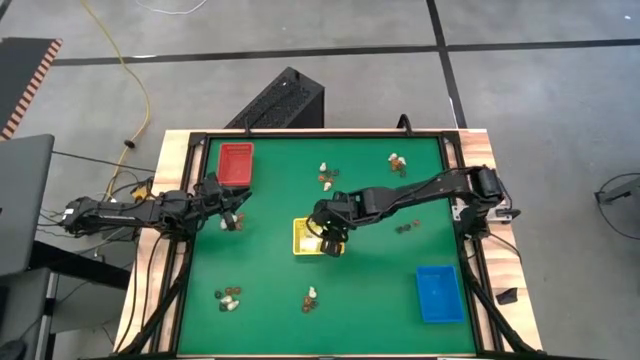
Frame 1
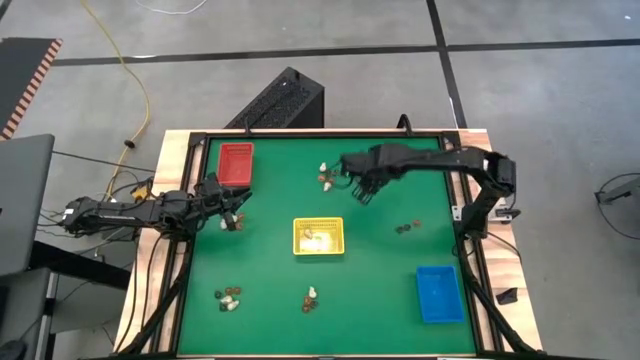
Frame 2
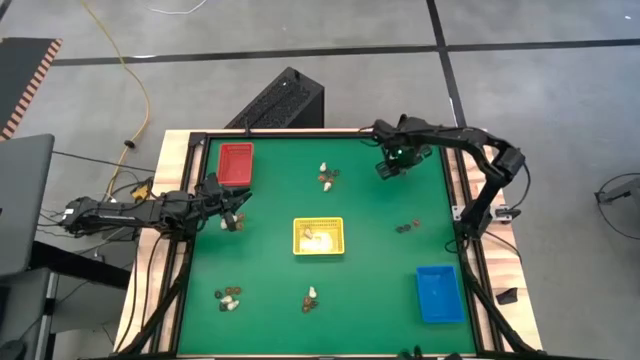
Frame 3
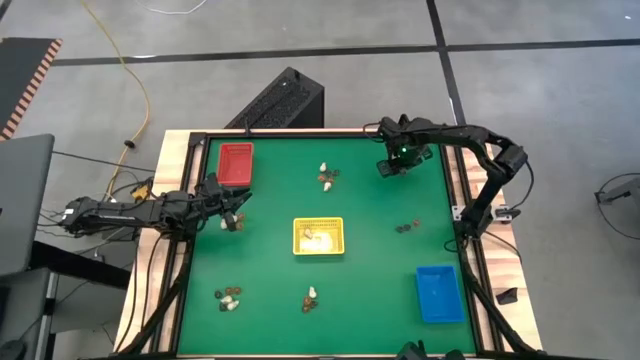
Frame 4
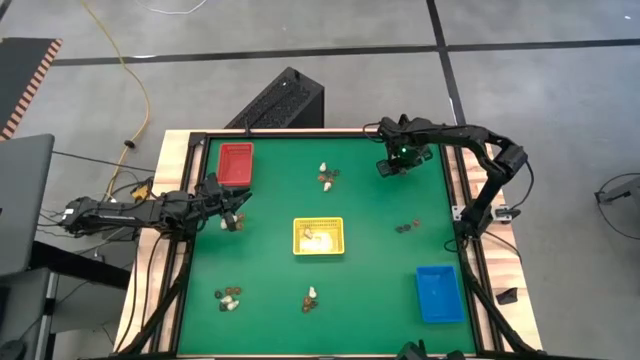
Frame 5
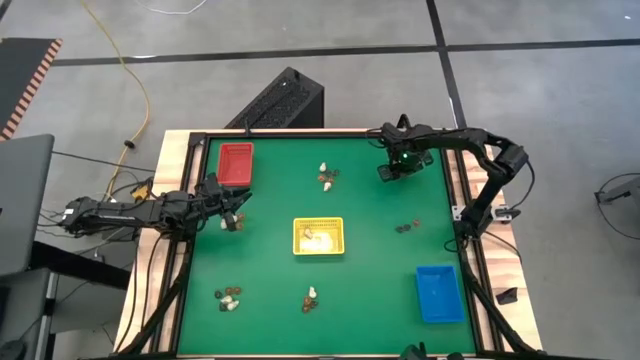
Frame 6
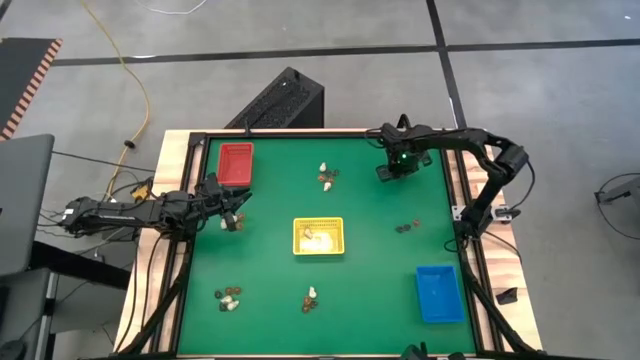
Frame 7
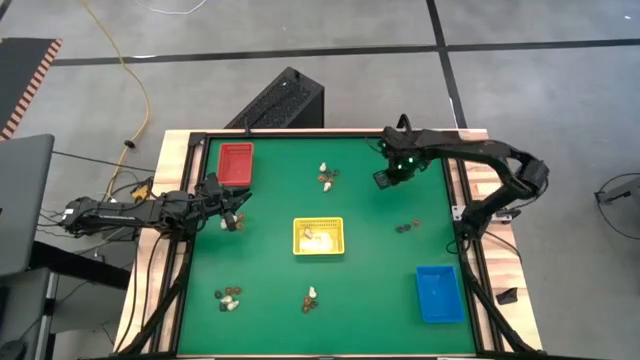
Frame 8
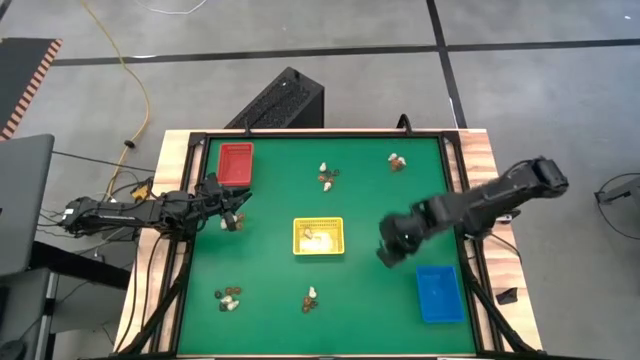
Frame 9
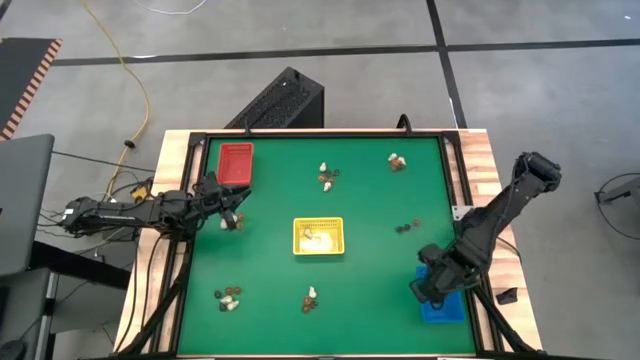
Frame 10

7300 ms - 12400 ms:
Task: Sort Halloween decoration
Put the black skull toy into the blue bin

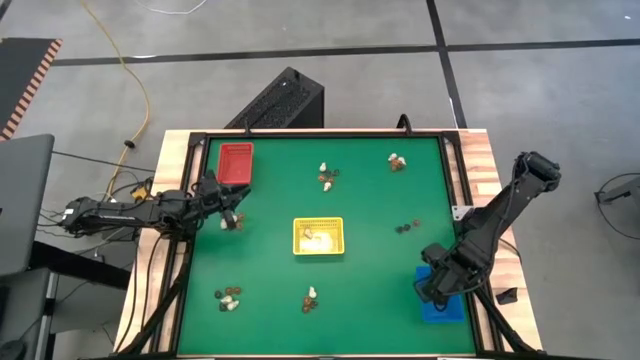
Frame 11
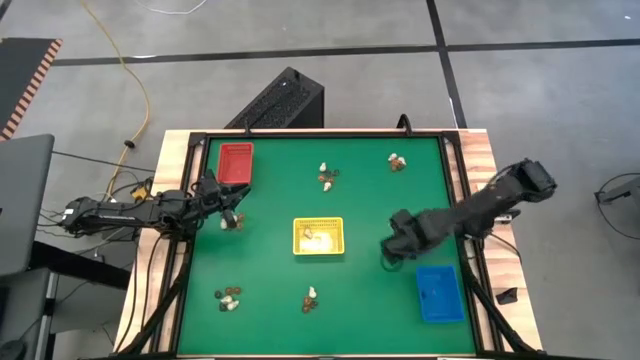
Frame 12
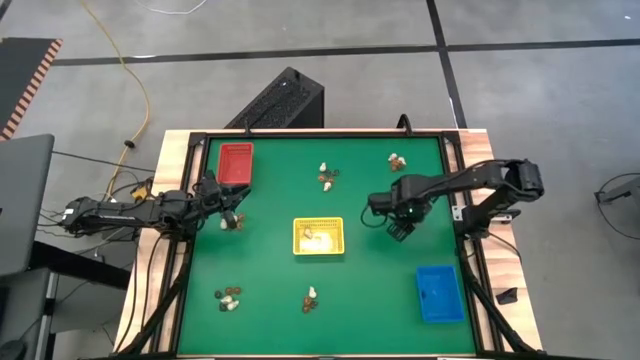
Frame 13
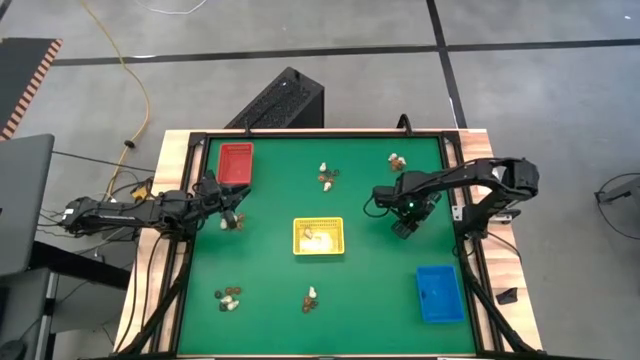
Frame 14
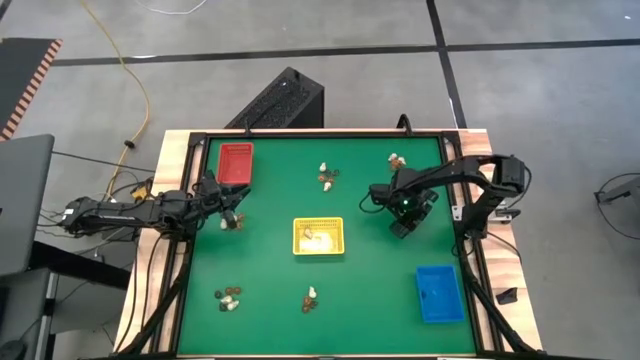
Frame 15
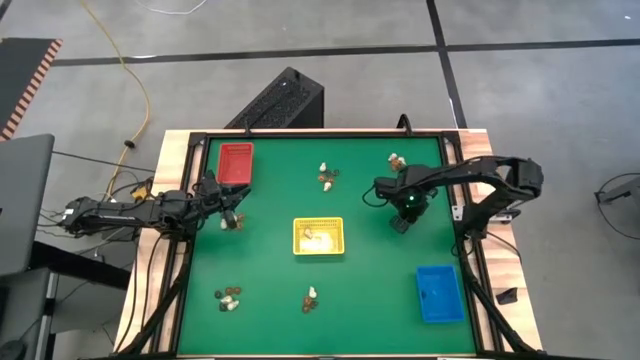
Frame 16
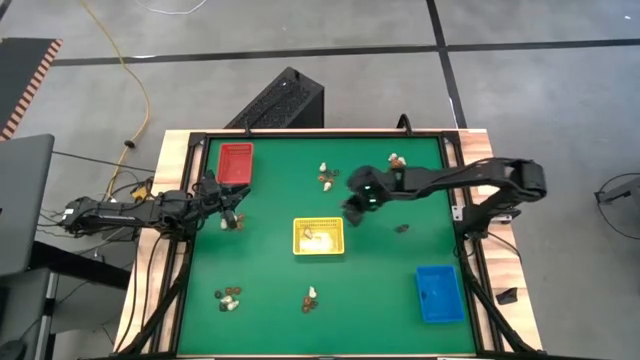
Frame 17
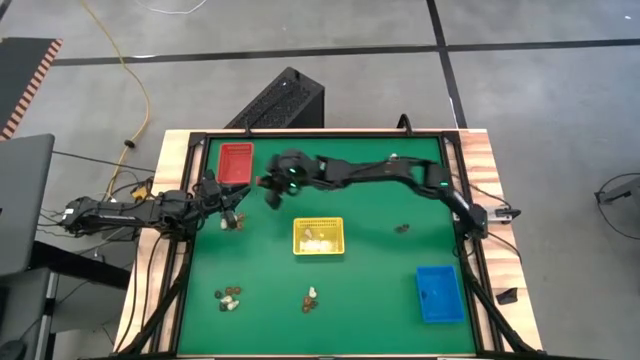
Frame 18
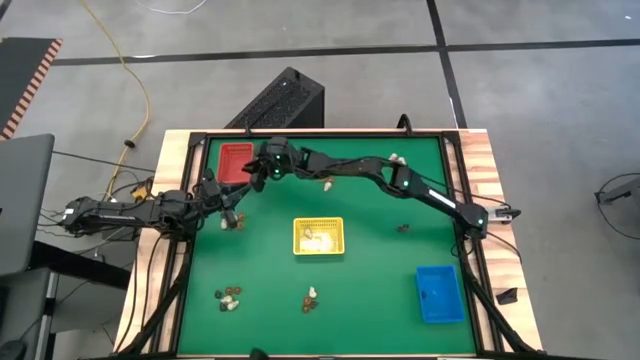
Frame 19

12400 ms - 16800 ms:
Put the orange pumpkin toy into the red bin

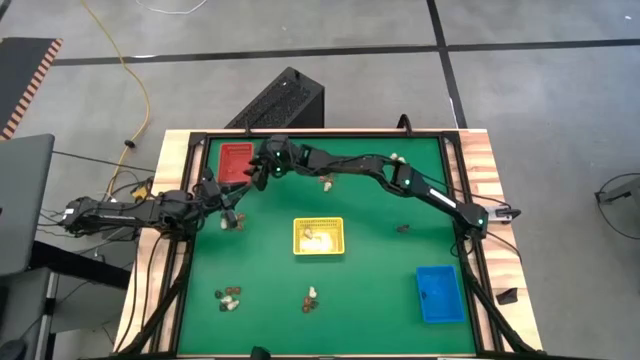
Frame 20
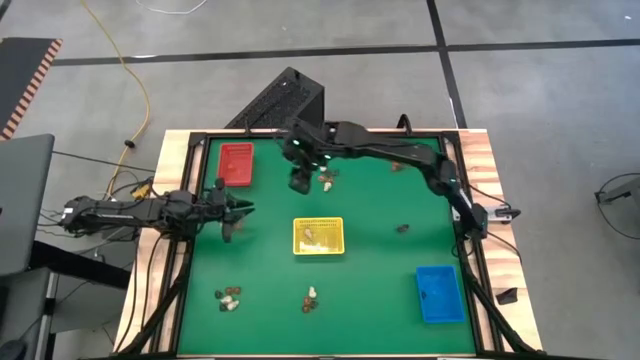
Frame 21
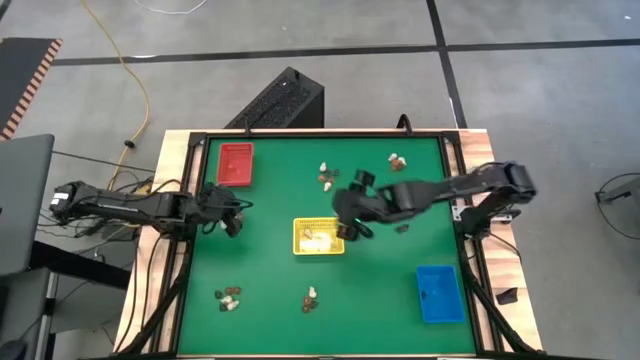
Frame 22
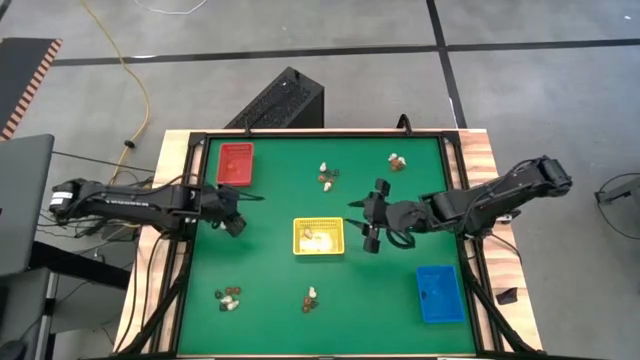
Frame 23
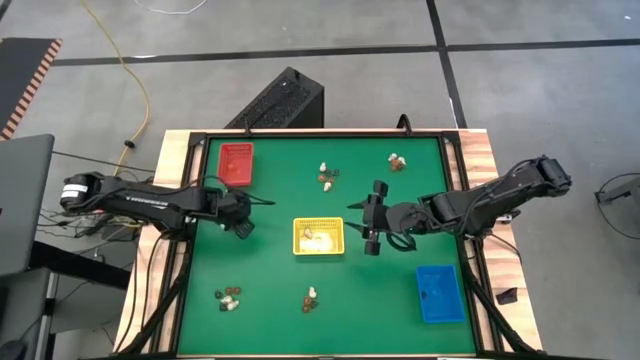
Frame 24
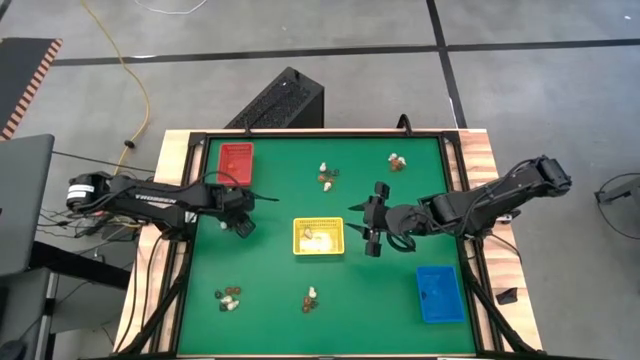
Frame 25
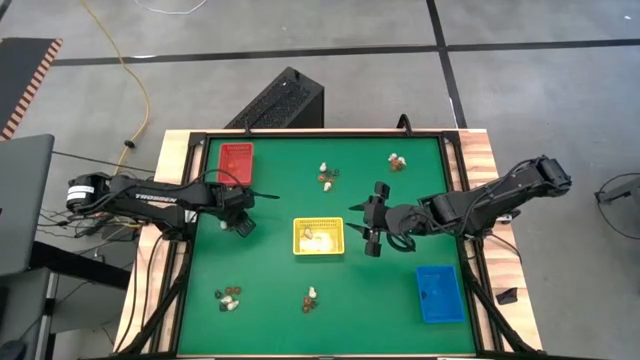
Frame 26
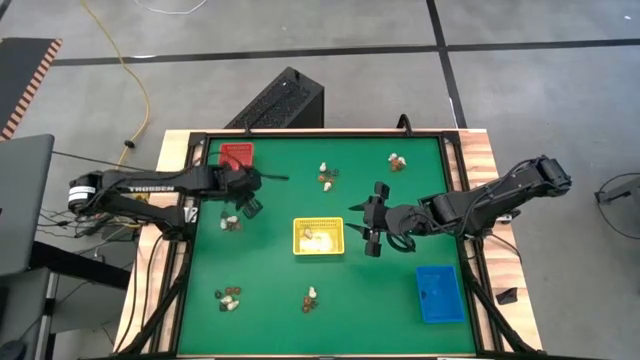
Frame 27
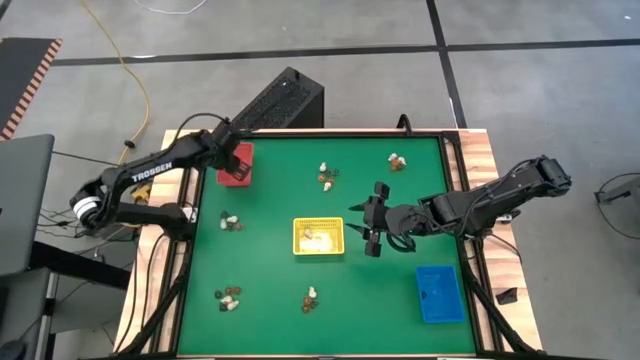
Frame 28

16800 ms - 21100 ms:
Put the orange pumpkin toy into the red bin

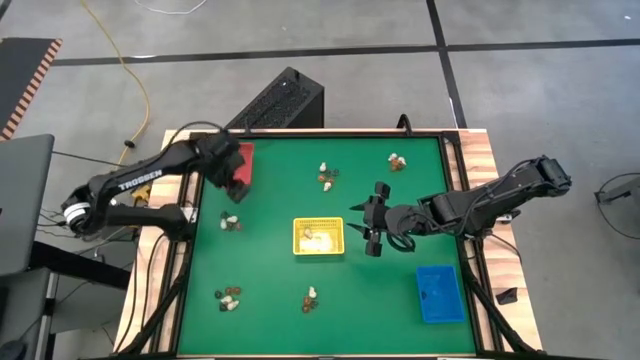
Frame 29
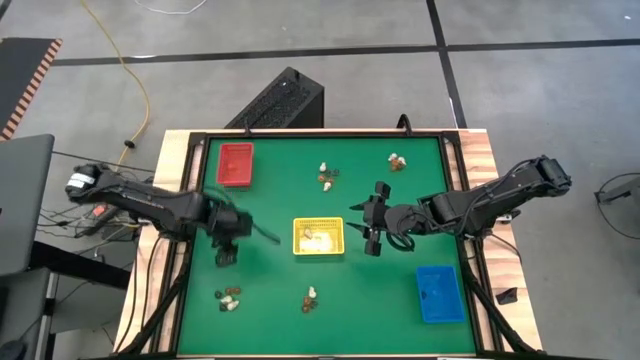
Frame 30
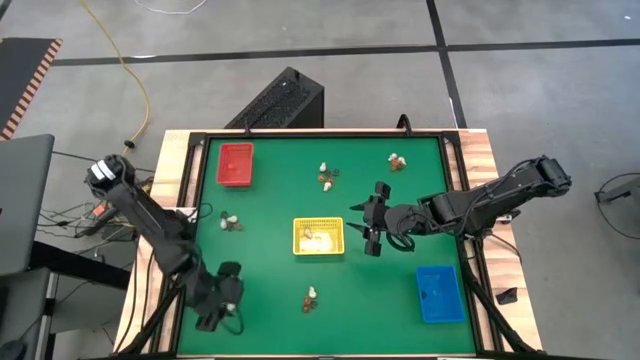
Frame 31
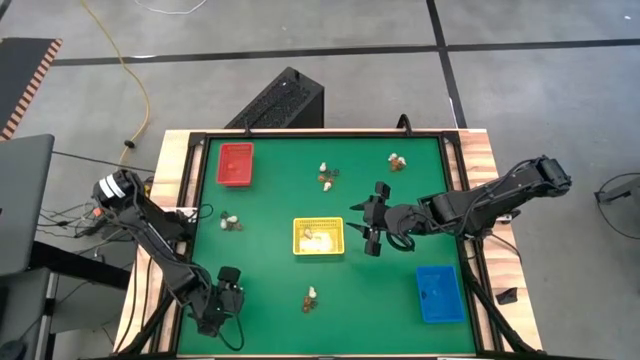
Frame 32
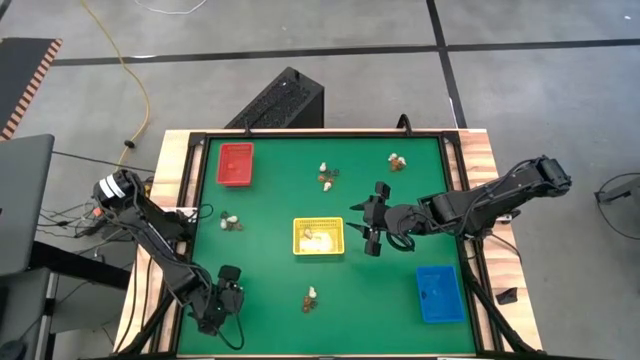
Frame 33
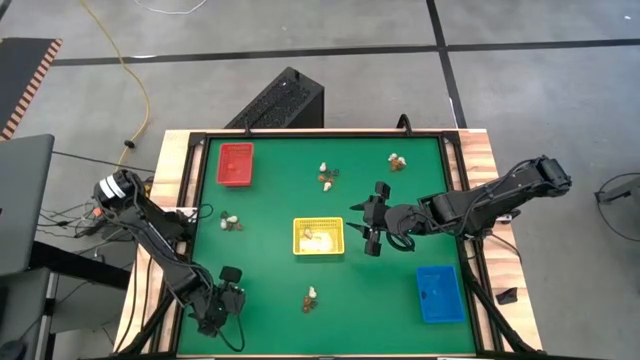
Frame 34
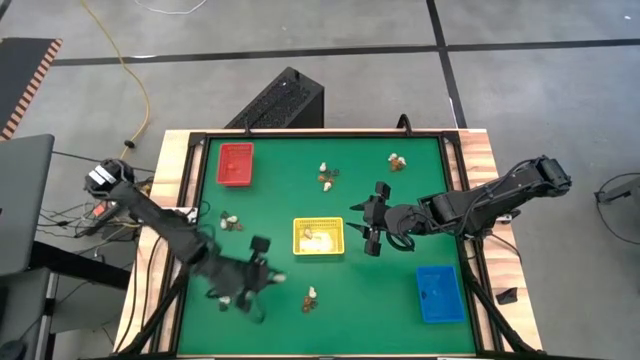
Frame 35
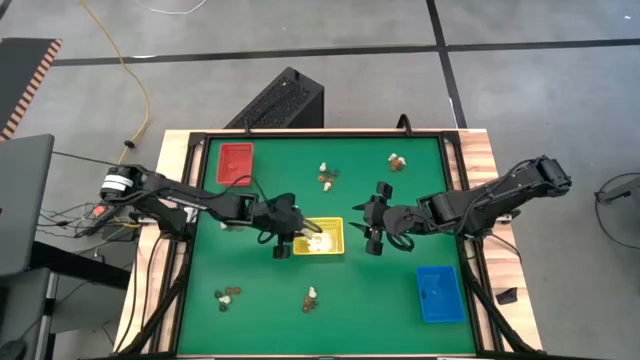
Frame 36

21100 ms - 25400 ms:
Put the white skull toy into the yellow bin

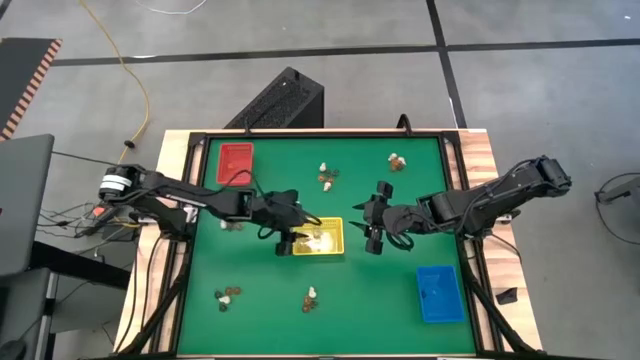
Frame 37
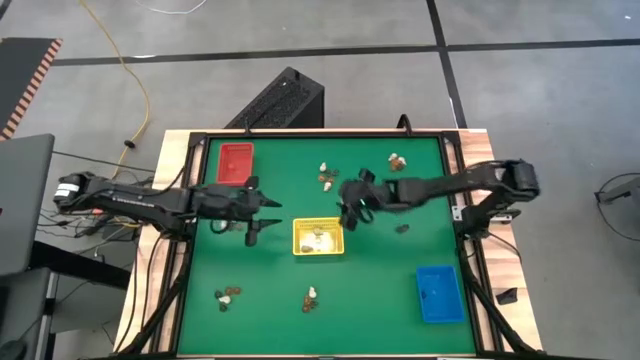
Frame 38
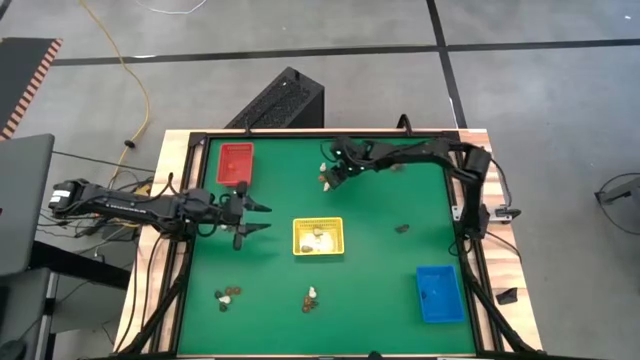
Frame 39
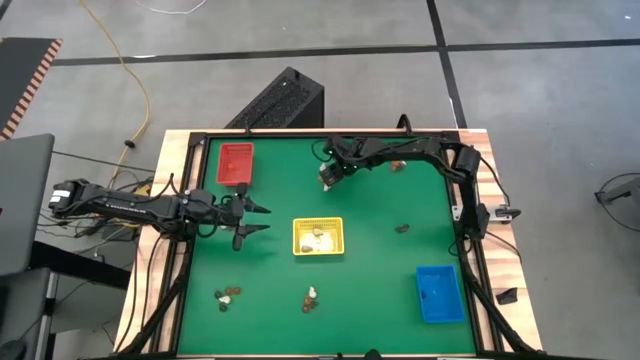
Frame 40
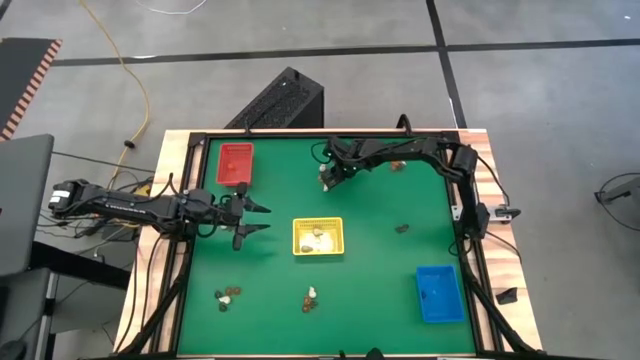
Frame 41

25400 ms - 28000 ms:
Put the black skull toy into the blue bin
